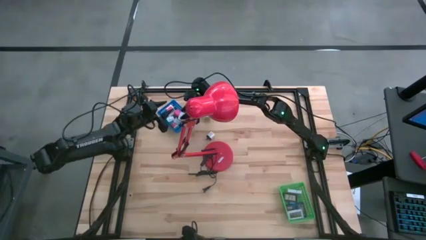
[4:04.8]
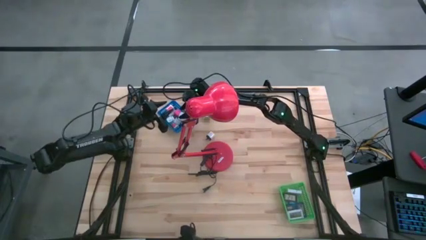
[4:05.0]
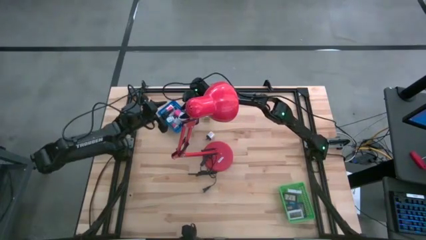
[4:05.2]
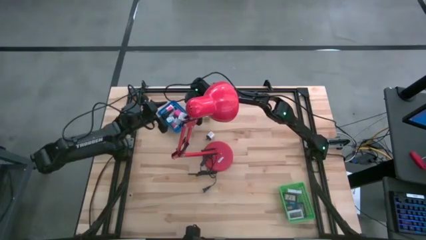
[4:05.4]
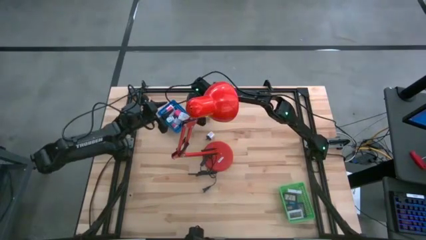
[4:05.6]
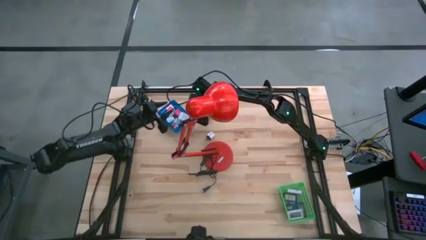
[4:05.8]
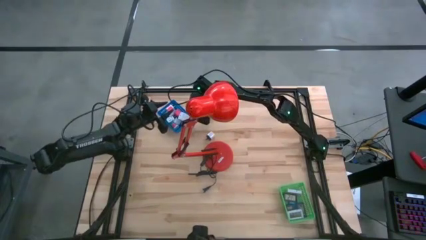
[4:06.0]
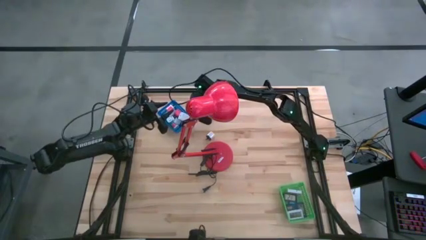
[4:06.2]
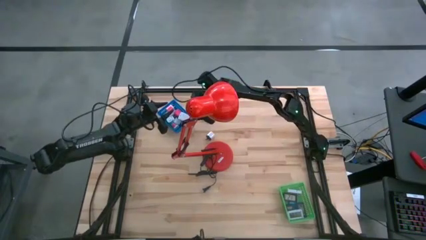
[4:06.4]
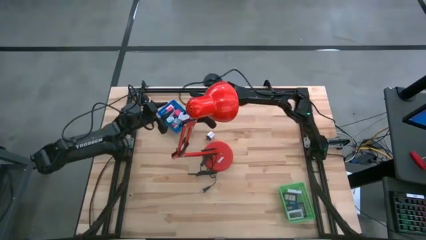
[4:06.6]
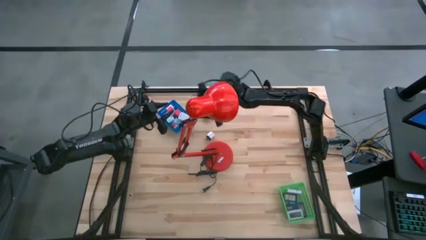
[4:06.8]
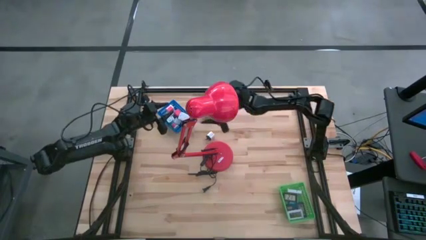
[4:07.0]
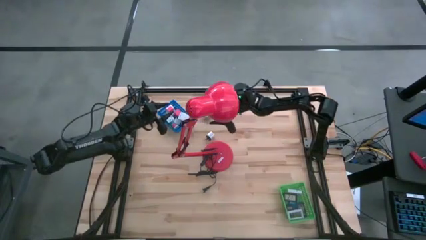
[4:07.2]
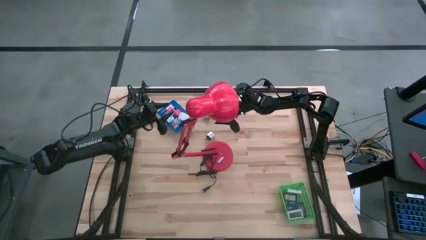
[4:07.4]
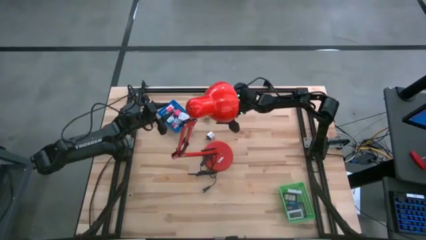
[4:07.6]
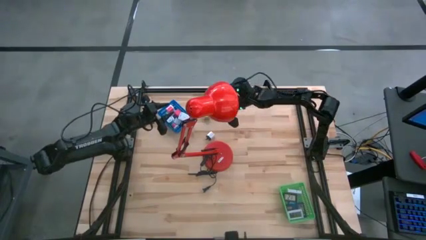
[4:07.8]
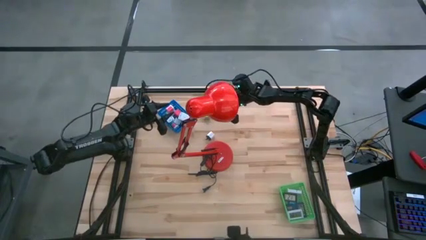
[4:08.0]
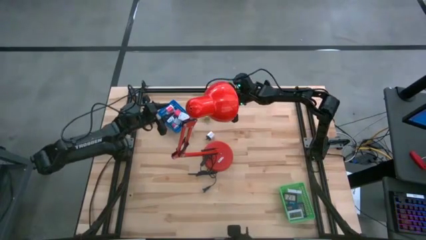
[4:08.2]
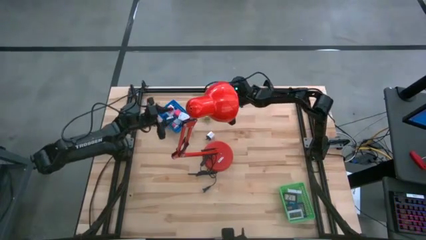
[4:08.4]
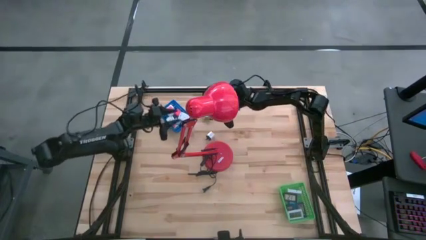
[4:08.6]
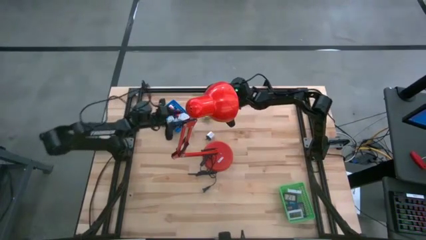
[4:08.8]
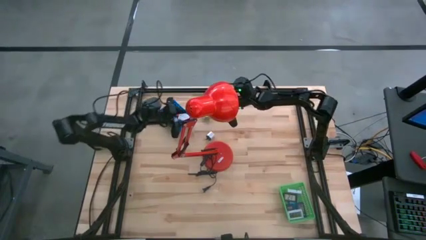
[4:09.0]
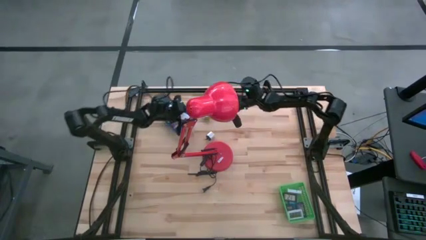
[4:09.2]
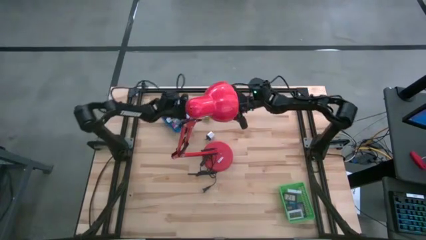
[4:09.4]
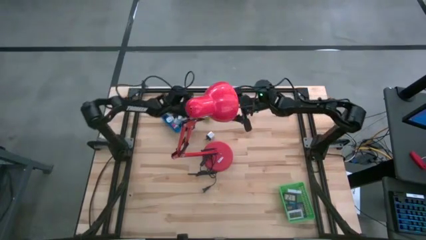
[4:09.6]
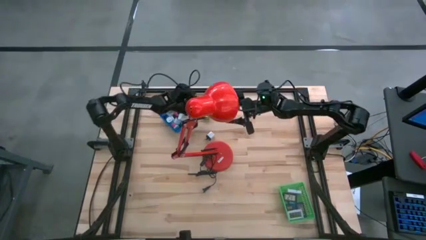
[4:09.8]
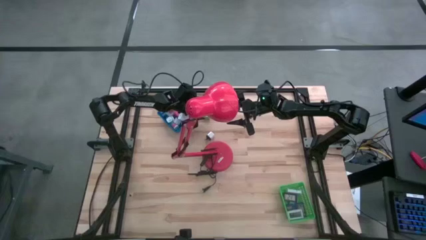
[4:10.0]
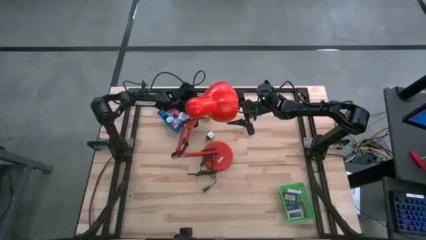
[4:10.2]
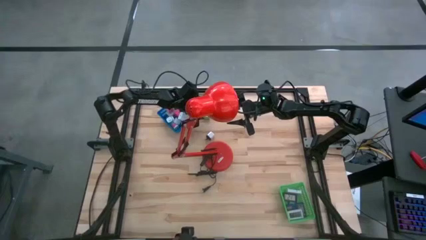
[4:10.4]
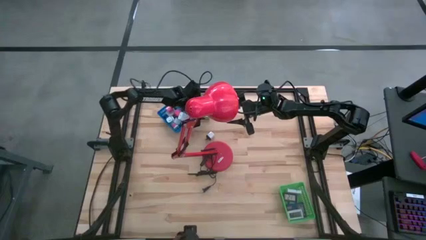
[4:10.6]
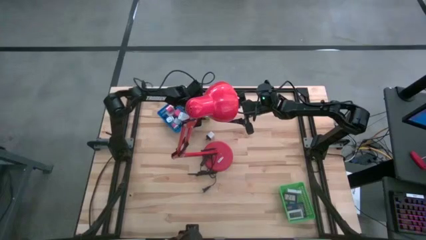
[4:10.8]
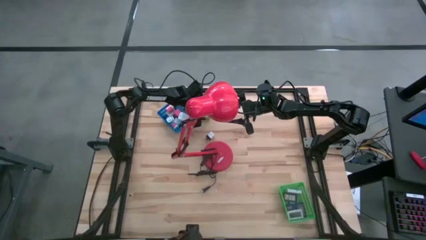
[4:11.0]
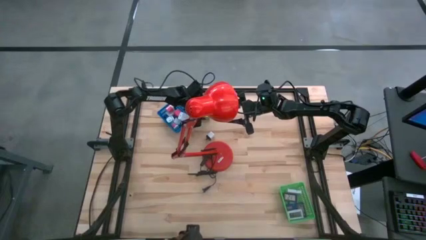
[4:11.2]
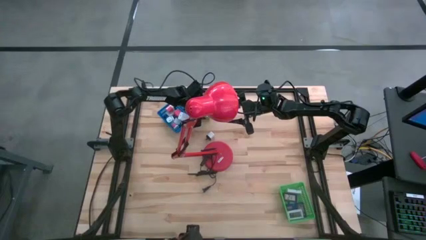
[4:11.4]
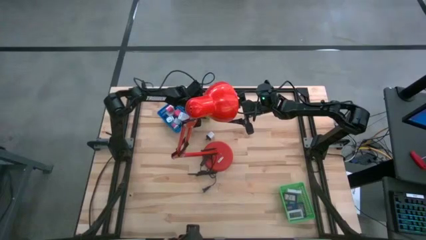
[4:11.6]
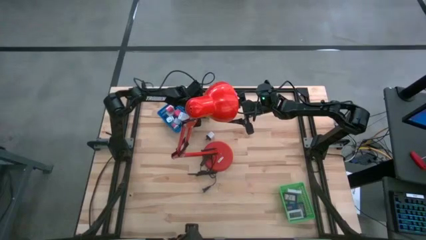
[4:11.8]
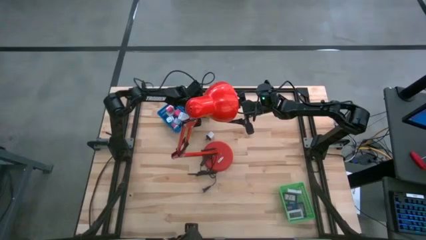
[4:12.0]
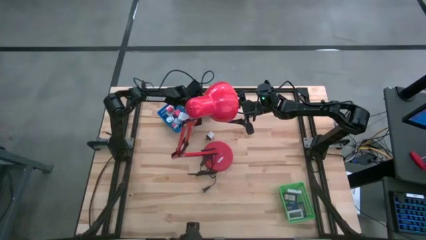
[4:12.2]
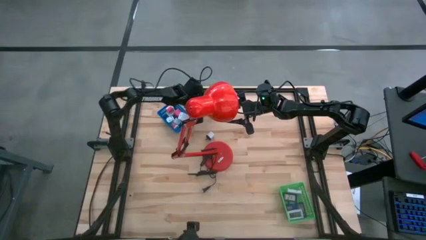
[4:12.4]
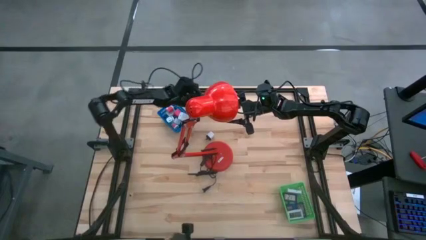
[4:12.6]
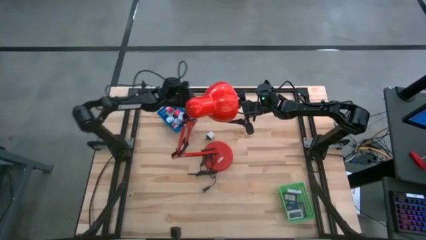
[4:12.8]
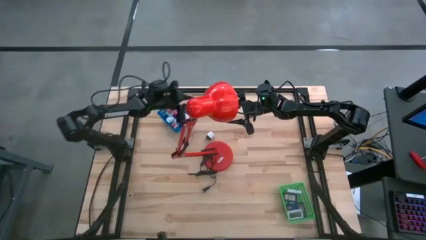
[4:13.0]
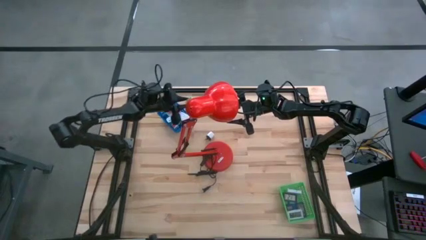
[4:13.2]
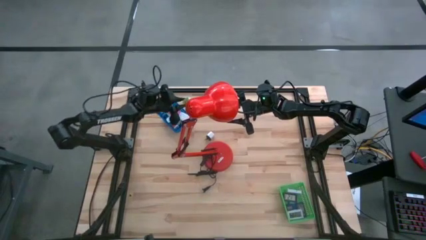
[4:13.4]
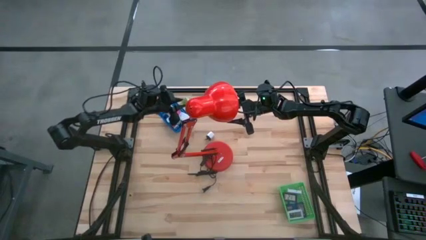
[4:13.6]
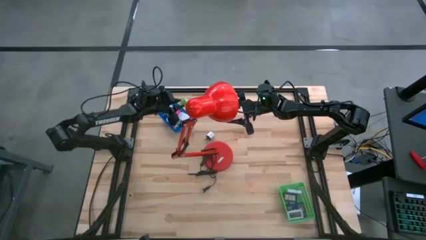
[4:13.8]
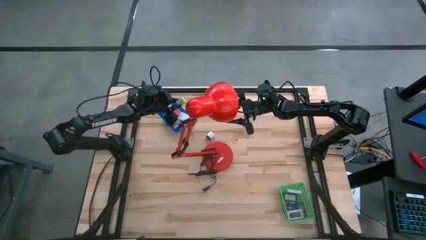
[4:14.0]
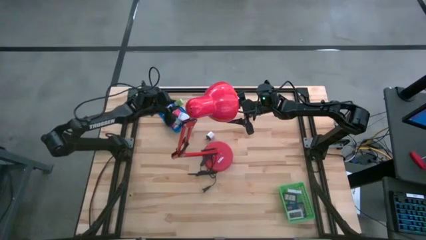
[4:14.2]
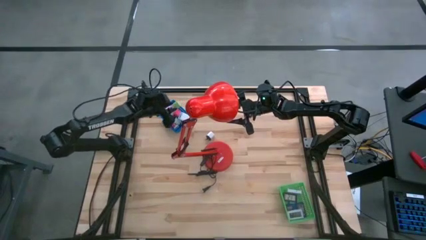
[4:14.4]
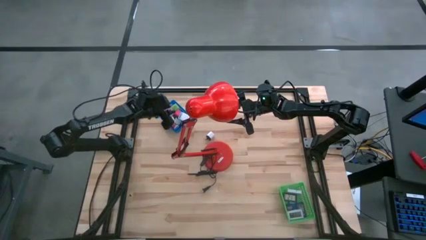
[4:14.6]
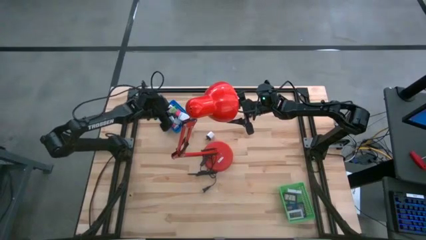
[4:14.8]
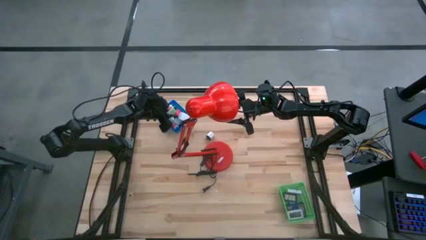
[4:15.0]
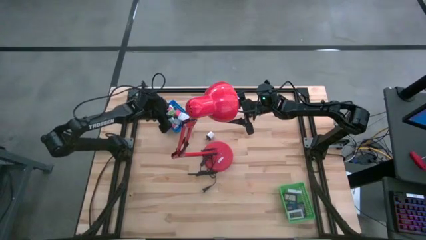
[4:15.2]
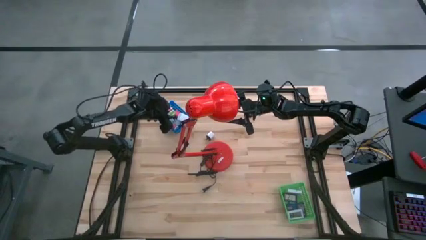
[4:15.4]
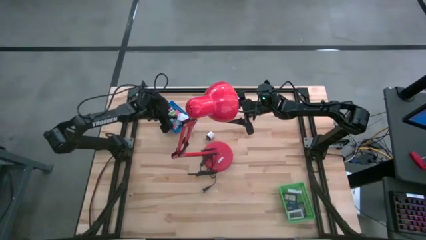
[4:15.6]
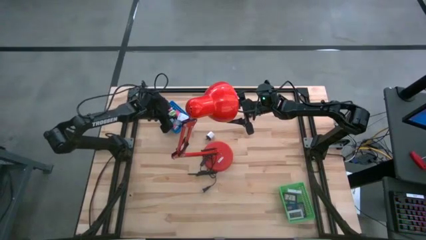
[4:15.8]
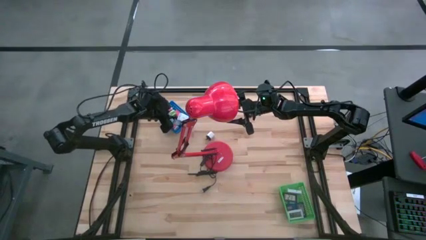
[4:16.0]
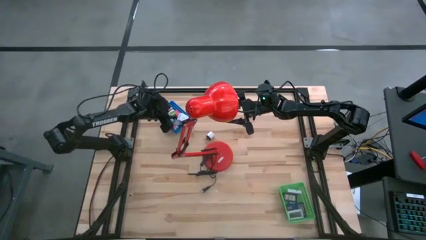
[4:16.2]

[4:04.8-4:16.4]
Task: Pick & Place Office items
Put the green charger adapter into the blue bin
